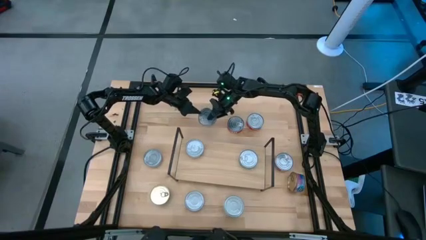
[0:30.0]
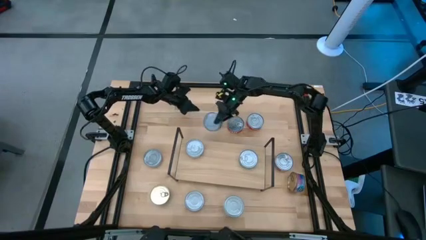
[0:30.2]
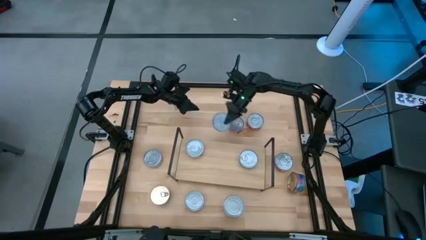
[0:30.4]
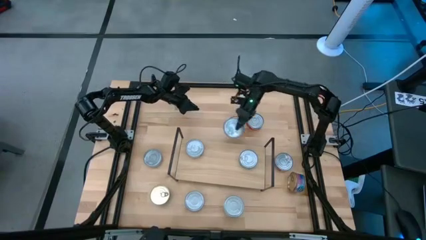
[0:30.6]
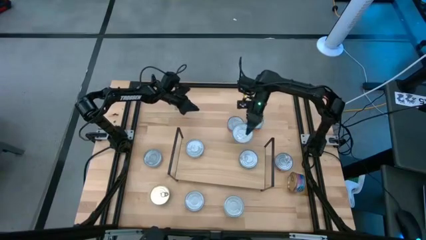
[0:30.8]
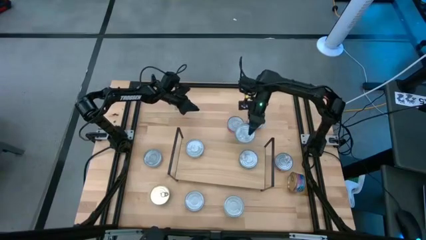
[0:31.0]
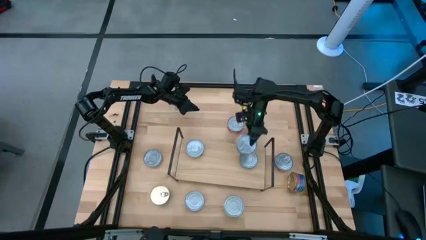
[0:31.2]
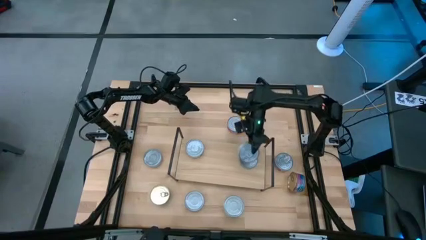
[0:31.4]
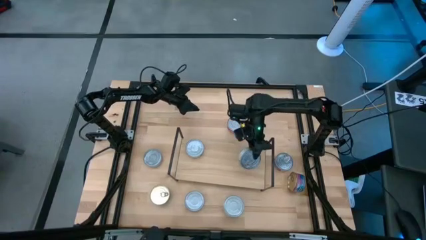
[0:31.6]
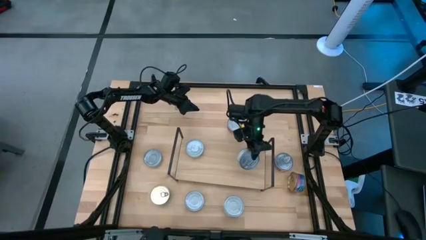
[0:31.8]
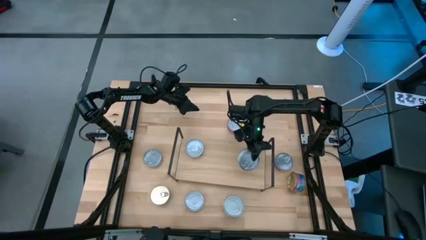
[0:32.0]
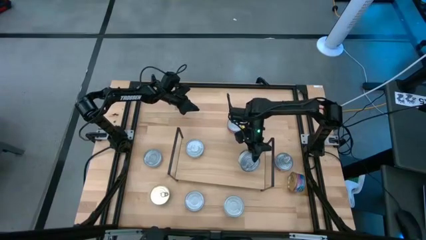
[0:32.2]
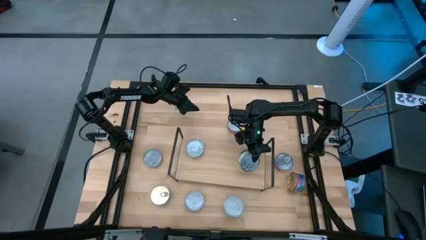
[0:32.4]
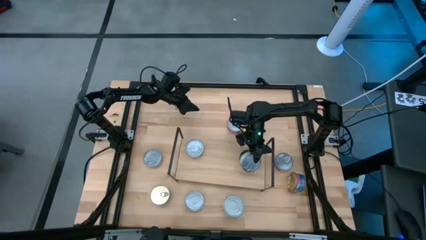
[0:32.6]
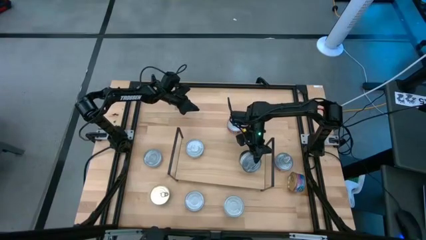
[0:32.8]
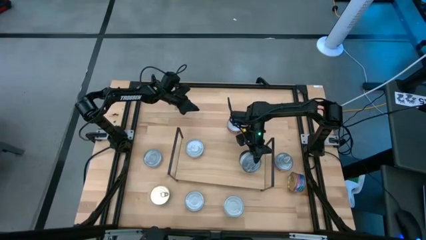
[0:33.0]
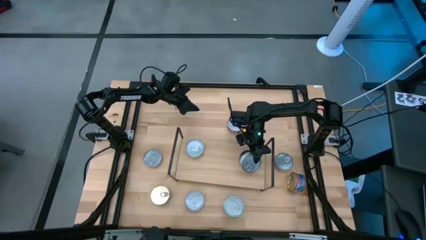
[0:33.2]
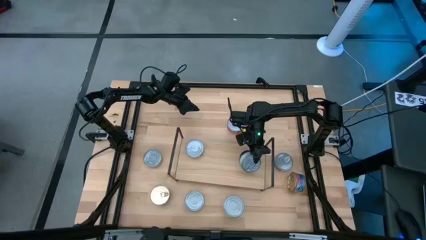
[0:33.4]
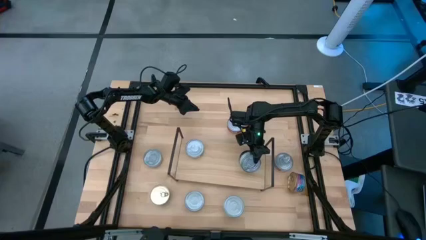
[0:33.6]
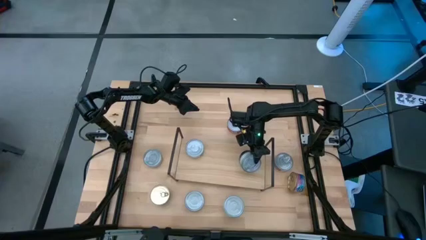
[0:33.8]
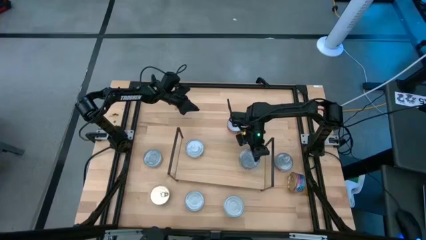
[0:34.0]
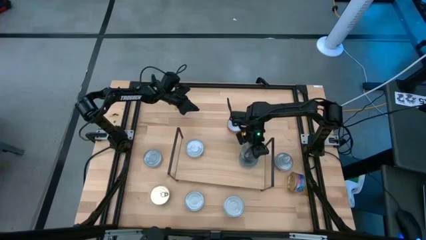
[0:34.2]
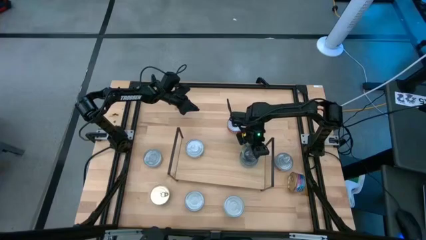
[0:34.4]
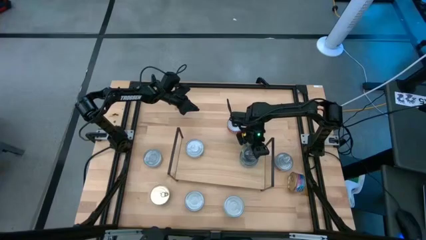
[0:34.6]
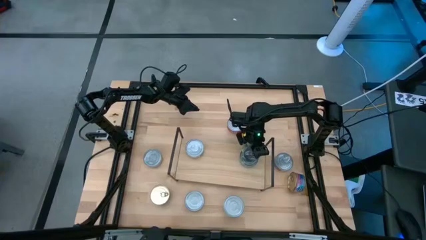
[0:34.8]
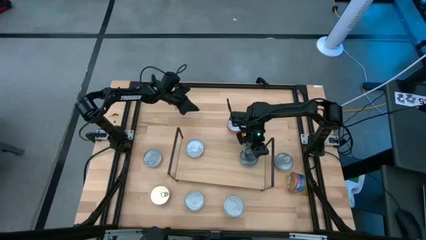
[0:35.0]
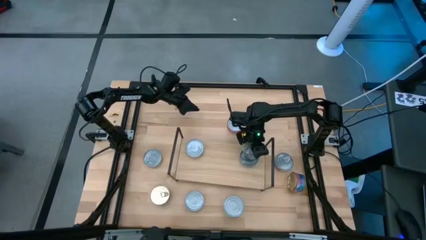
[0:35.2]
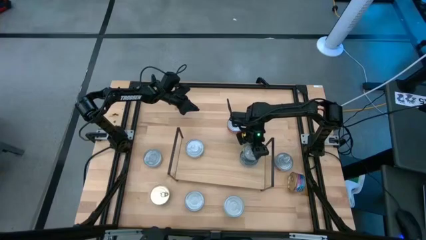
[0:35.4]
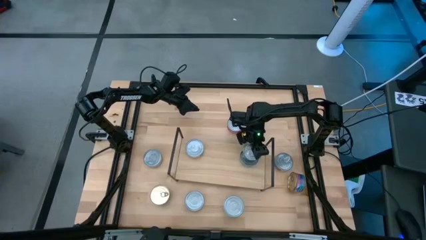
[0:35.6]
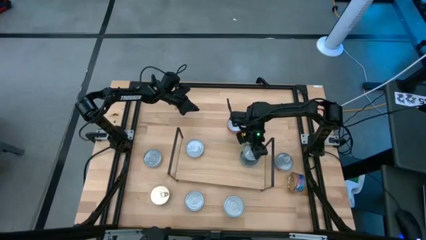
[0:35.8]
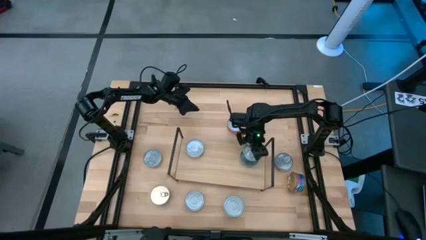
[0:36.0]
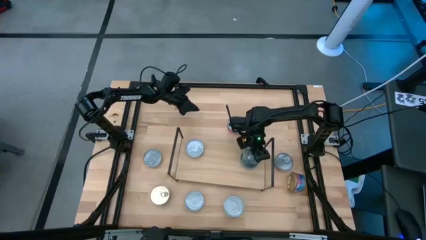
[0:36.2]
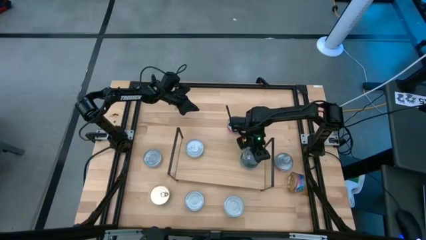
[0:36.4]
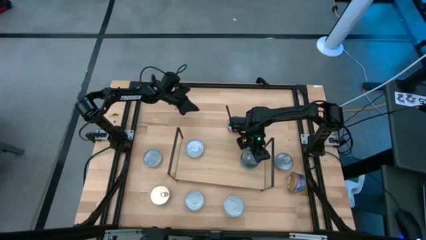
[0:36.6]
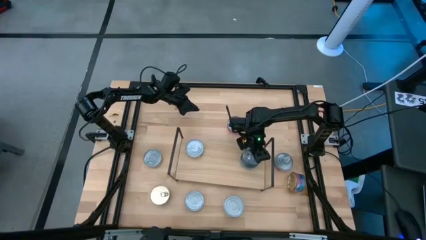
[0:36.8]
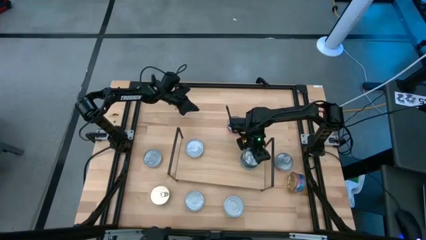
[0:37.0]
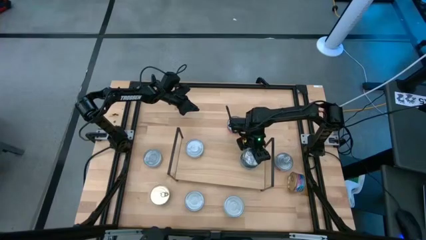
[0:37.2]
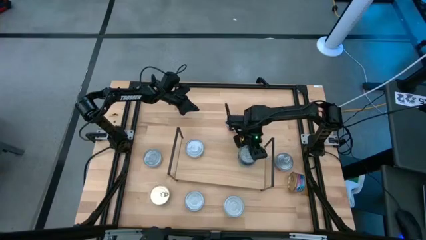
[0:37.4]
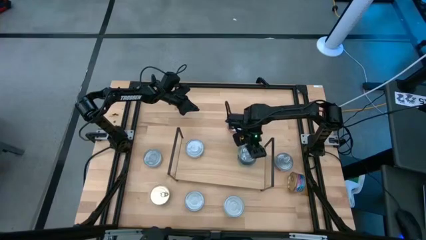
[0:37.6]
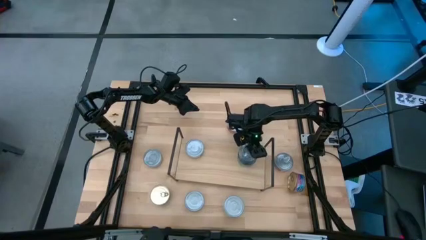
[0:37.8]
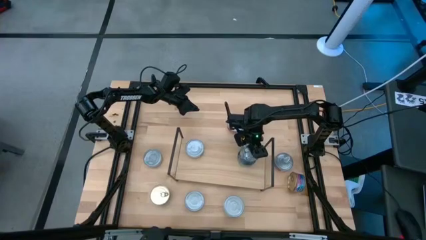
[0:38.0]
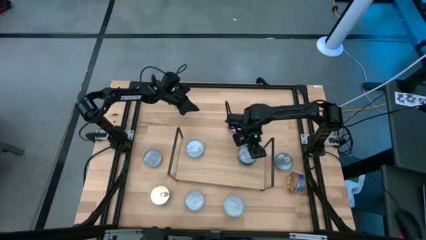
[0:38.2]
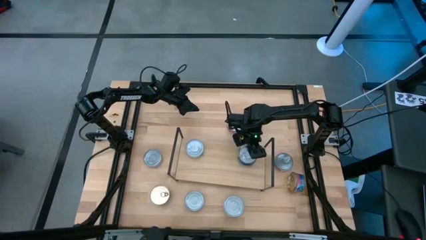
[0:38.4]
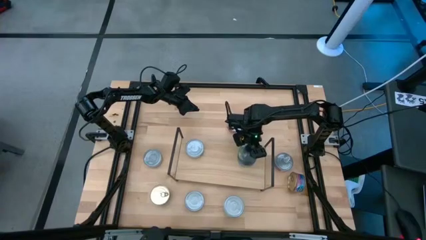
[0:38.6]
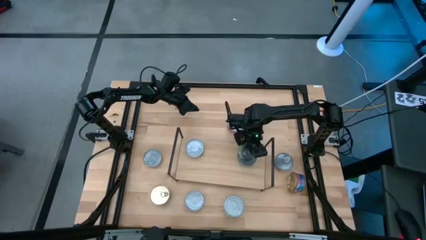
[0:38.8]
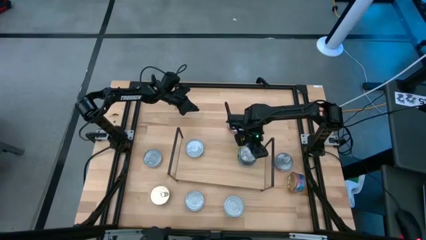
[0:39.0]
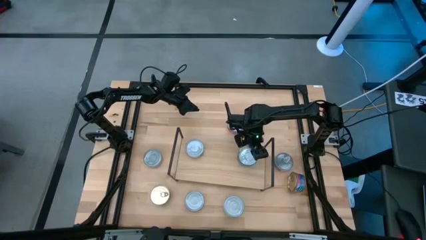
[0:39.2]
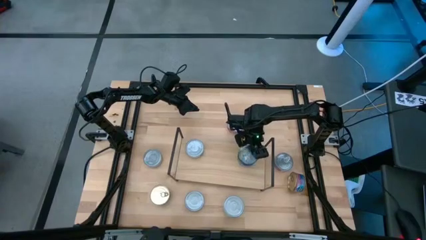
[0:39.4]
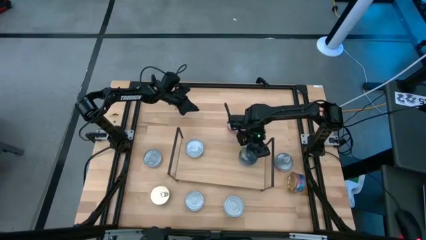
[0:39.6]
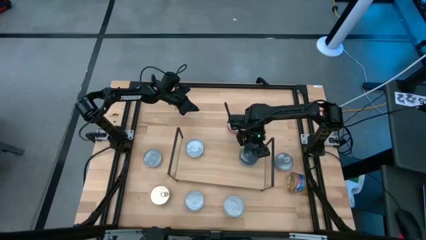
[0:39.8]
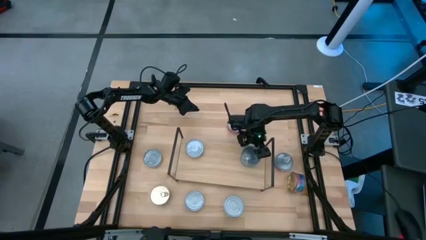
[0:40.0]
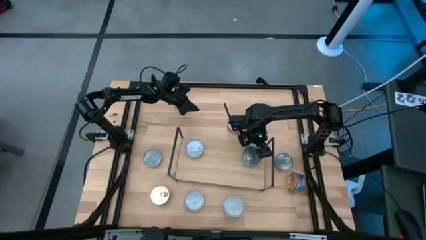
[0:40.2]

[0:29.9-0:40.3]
Task: Stack canned seafood by type on shelf
Stack the green tuna can on top of the green tuna can on the shelf

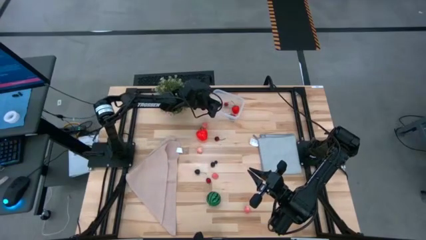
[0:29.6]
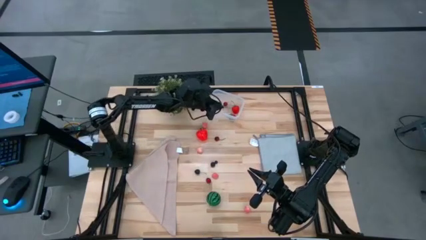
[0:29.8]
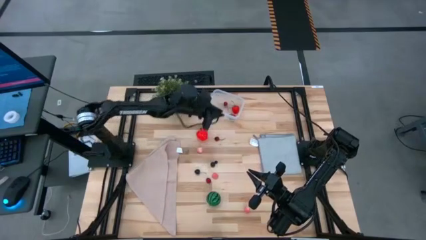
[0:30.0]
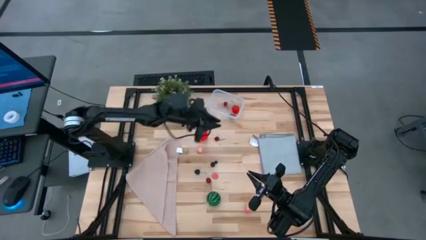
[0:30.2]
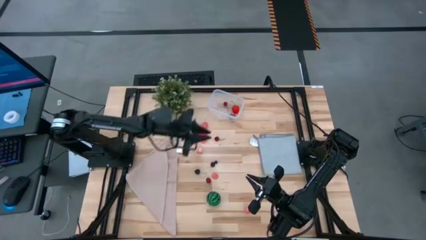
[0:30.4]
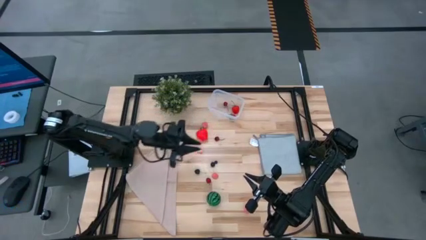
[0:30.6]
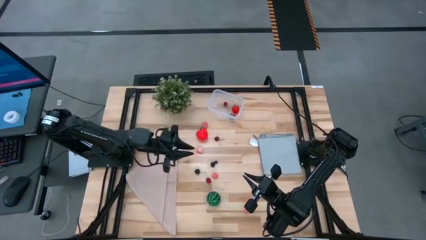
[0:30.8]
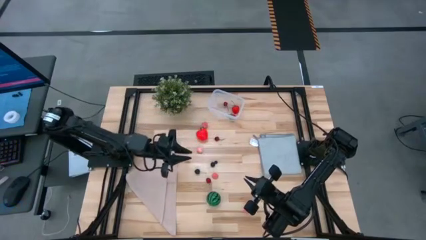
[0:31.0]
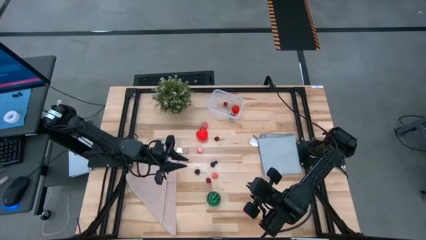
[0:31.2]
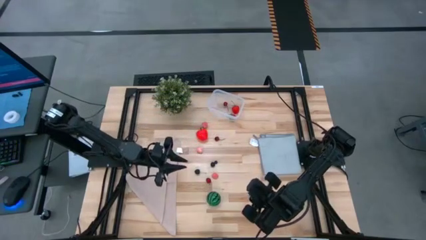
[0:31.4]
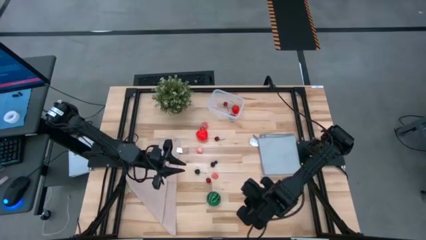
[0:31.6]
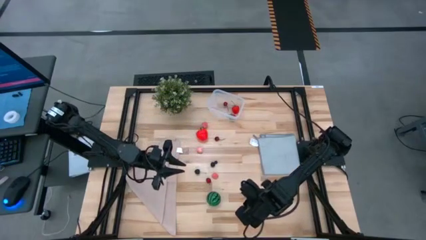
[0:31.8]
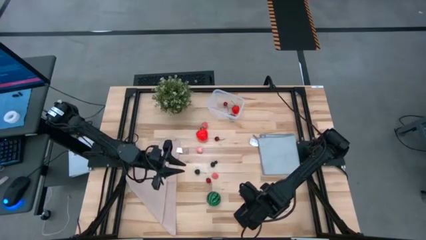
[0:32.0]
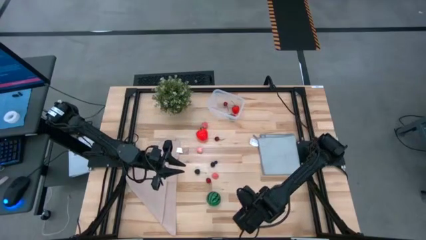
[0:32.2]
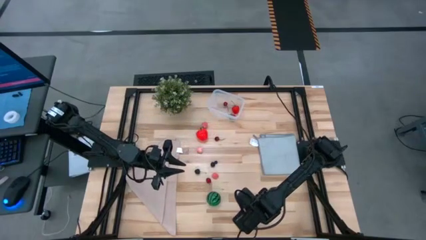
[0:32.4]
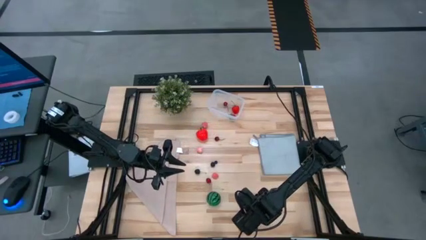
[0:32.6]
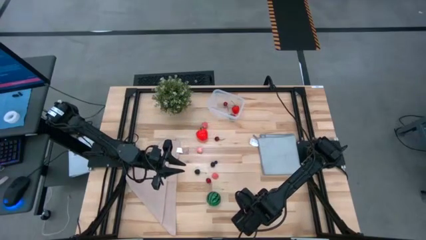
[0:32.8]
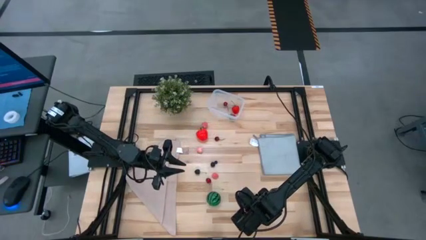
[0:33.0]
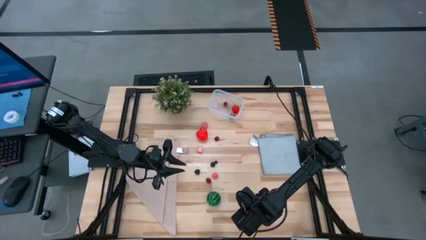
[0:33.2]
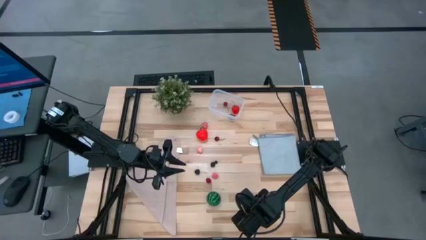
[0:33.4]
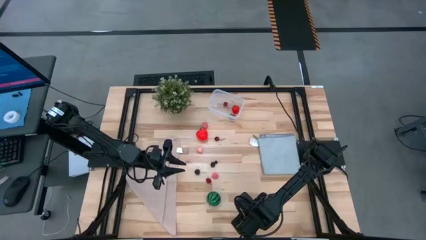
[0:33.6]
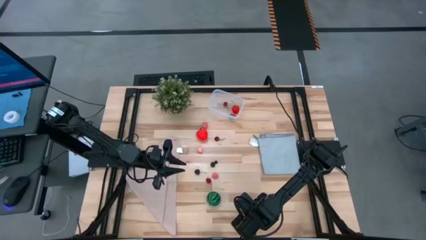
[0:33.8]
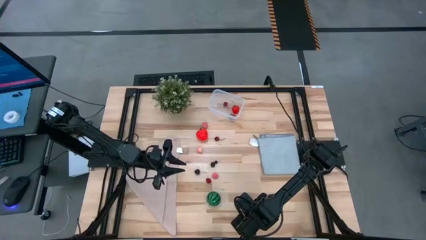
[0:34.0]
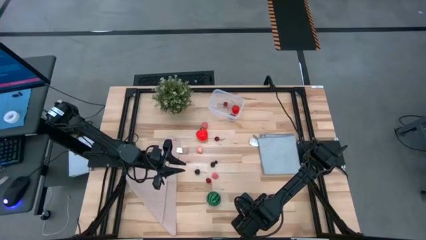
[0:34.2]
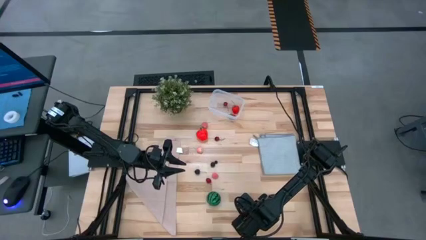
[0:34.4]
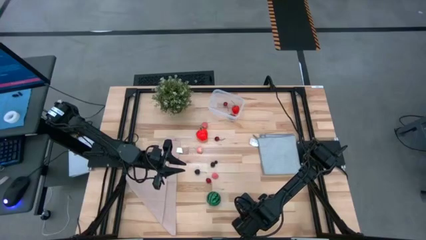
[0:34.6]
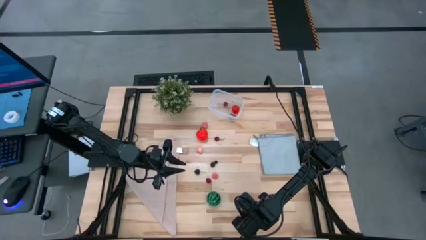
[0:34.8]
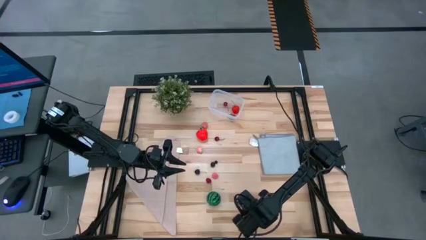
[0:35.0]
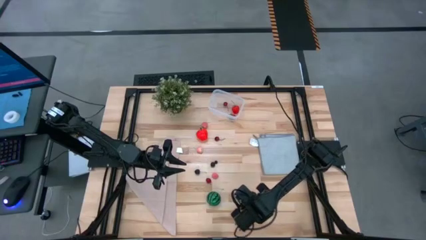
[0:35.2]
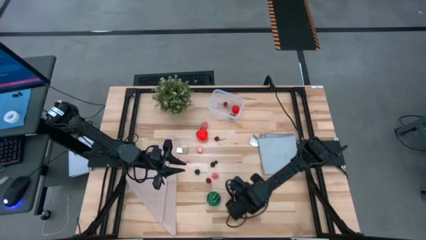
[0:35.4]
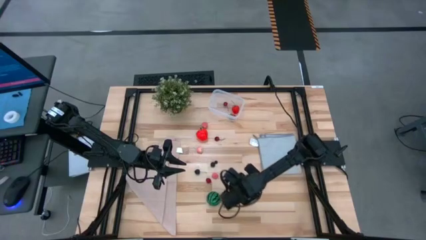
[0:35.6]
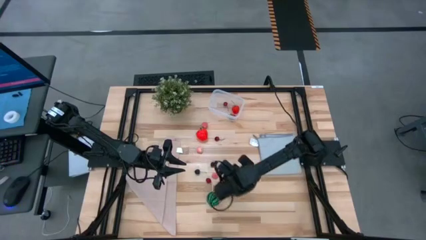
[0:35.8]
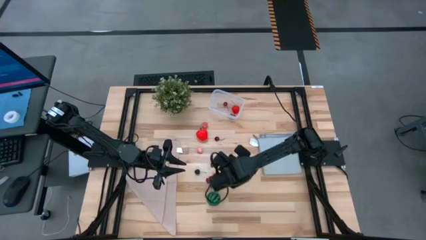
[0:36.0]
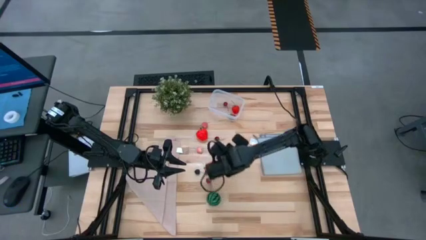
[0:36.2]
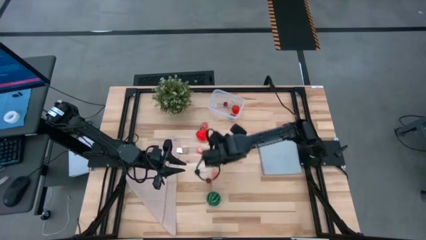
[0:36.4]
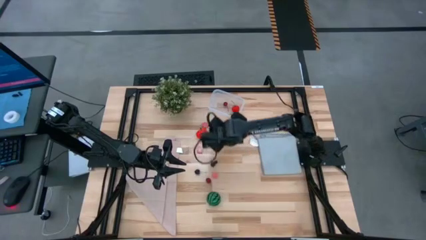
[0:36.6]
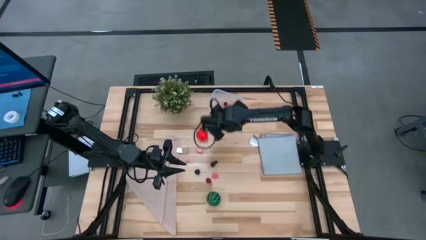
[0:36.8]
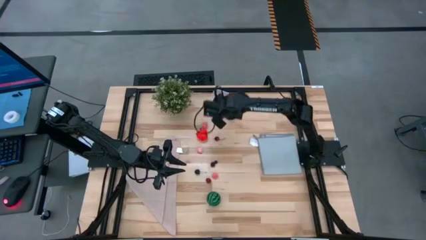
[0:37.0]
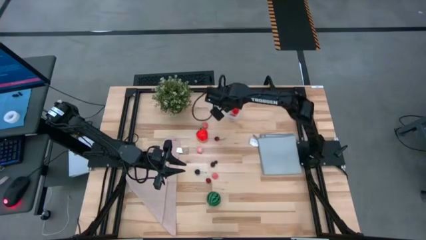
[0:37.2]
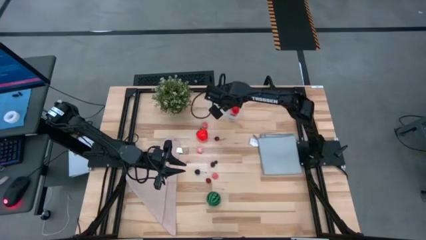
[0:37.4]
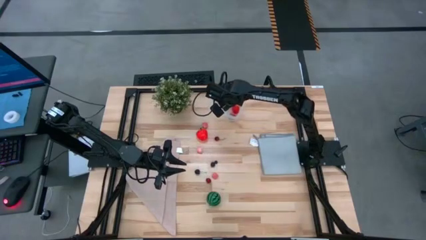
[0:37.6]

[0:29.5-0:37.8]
Task: Pick and placing Produce into tupperware
Put the peach into the transparent bin
